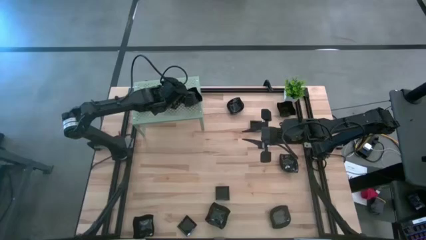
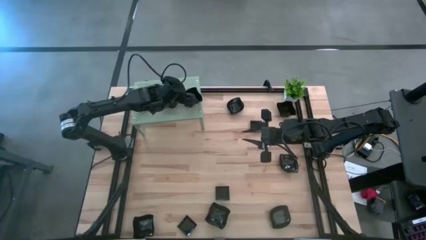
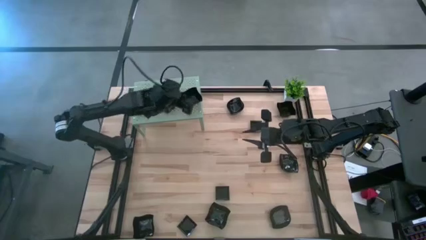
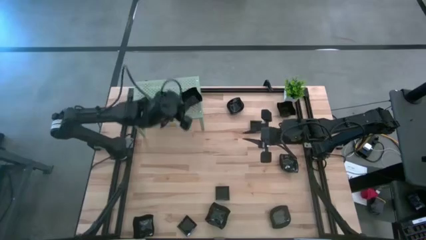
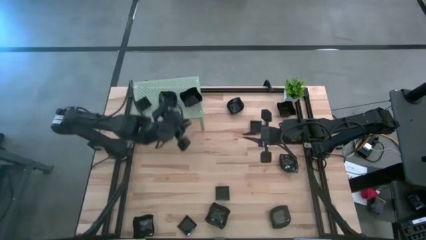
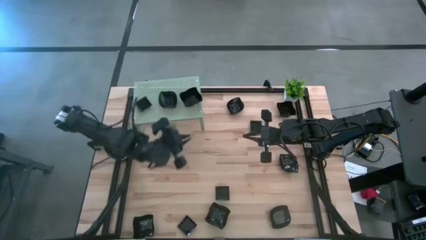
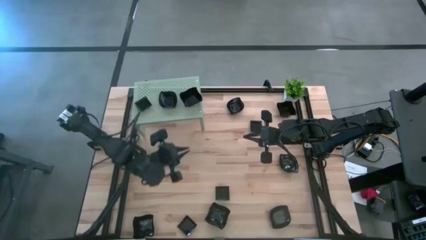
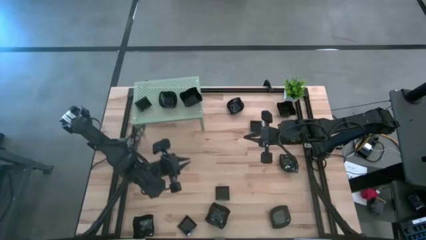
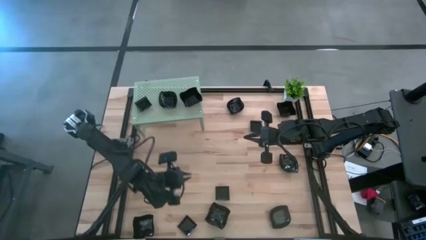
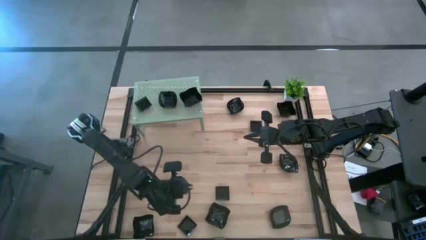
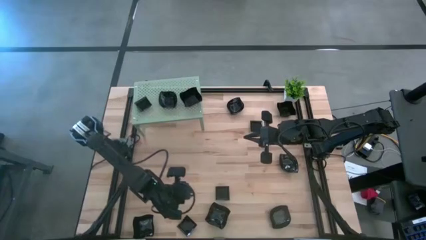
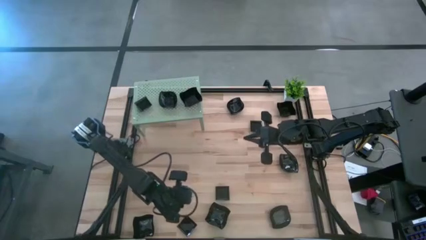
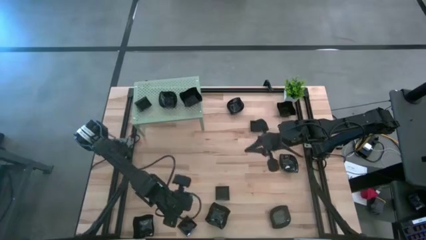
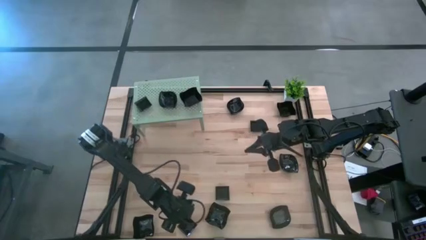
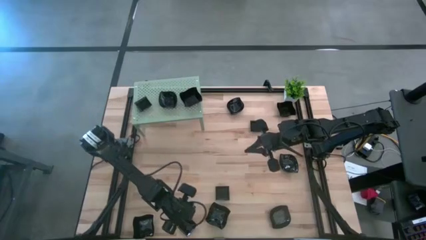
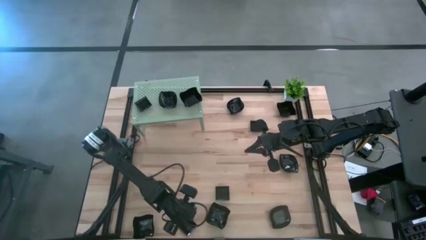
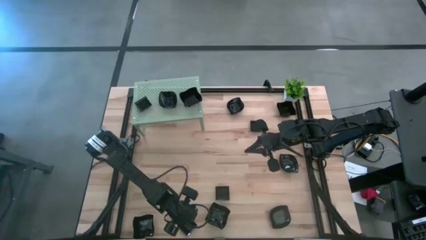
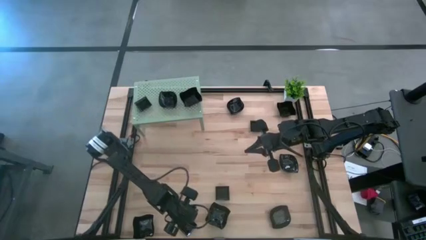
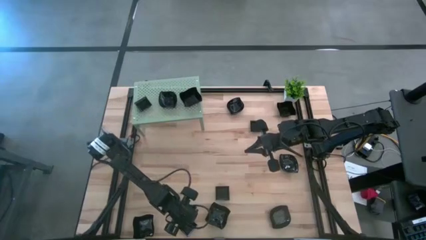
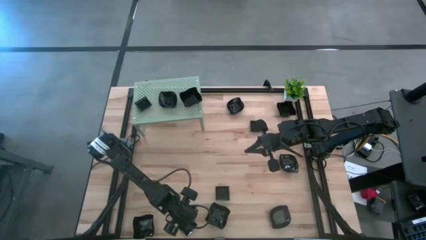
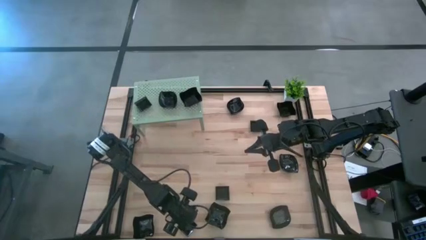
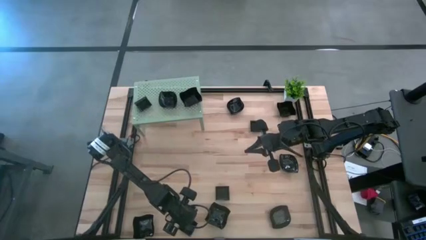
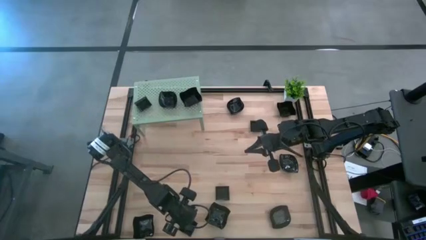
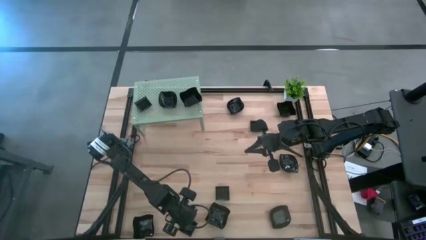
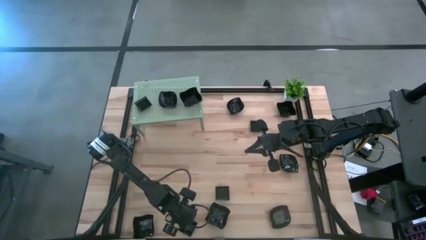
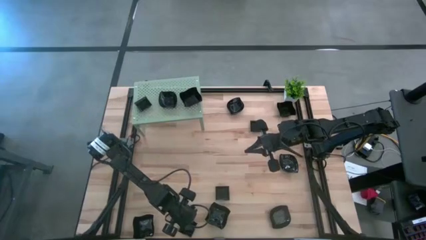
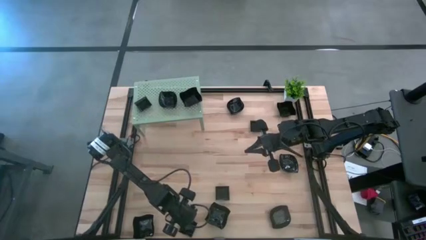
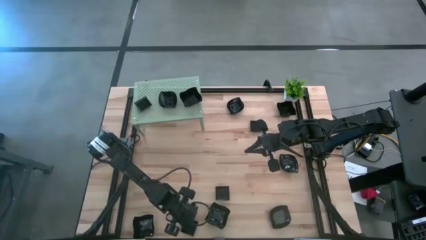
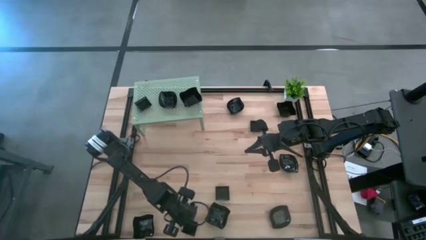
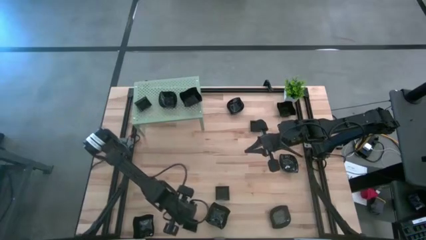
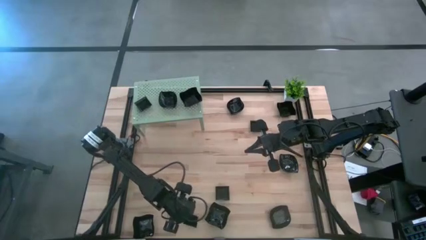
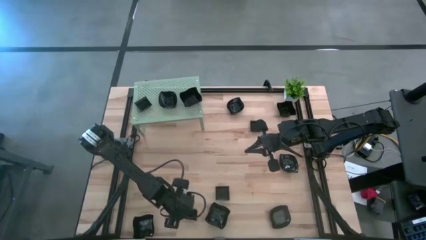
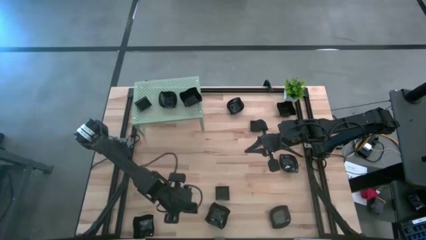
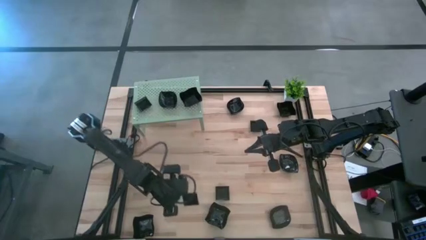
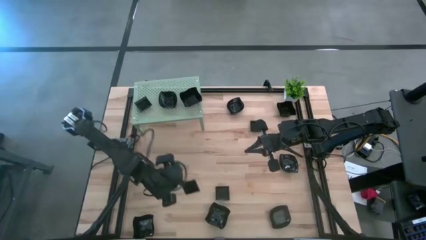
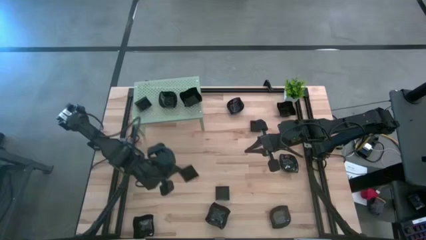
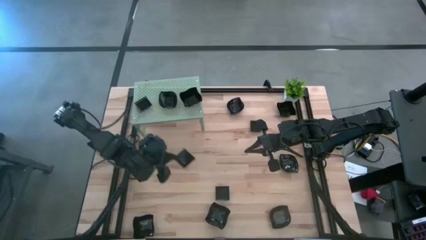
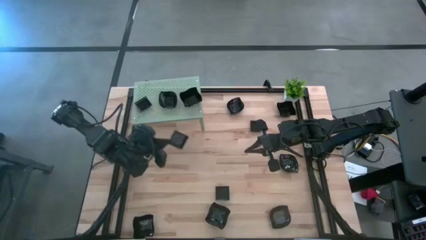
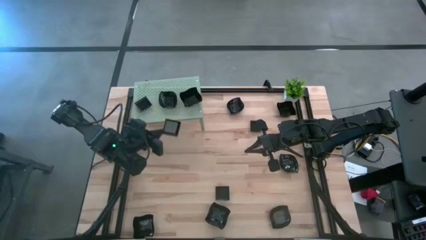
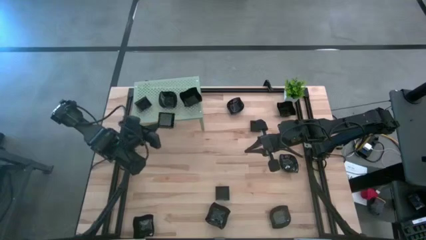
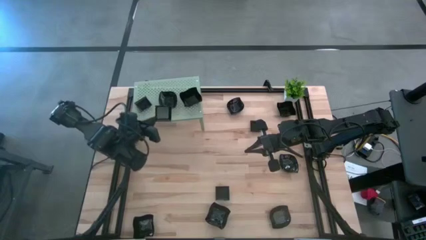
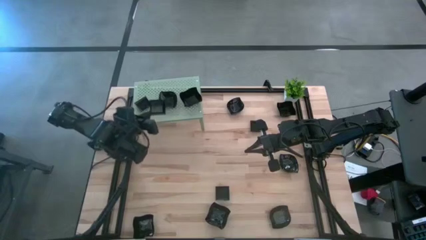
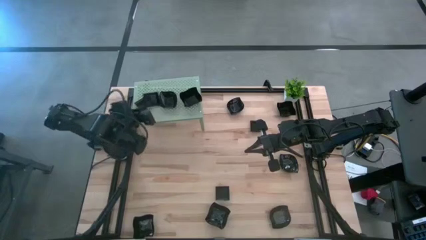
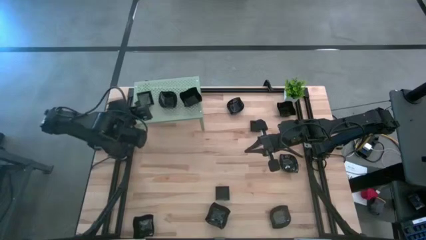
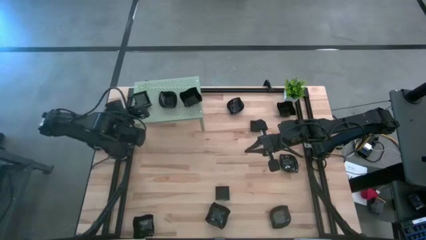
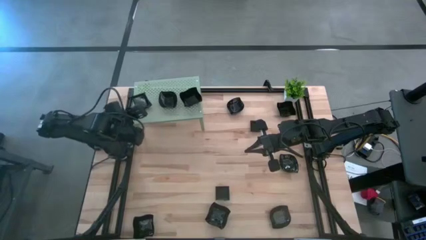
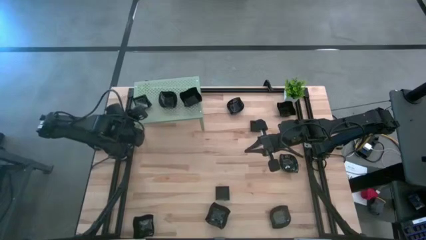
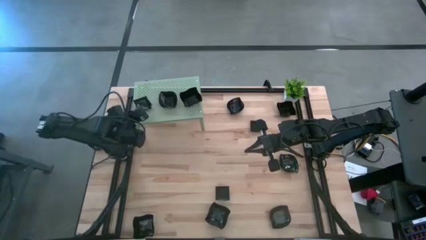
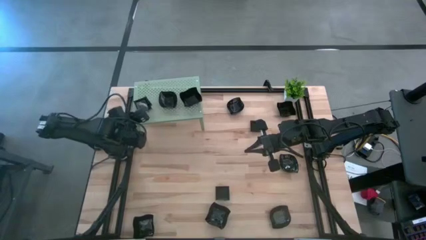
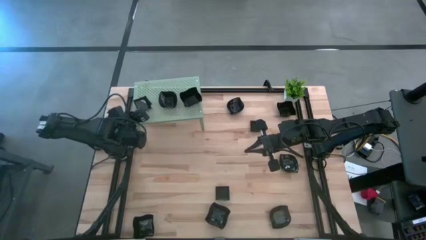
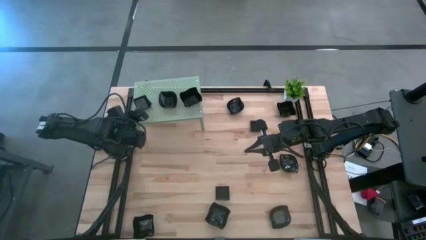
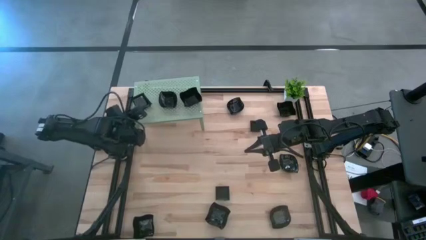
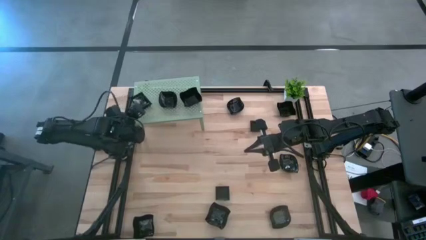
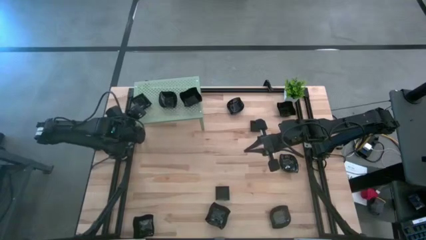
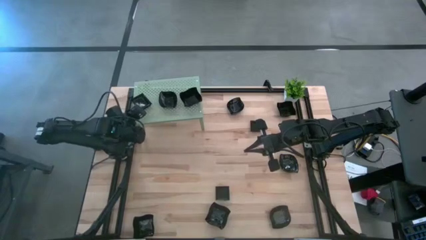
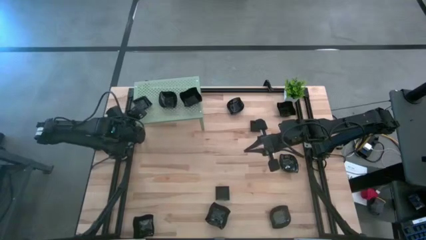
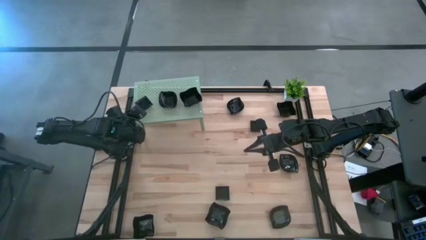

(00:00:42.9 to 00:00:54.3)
Task: Pick & Place Mini shaped plates
Stack the black square shaped plate on top of the square shaped plate on the shelf
